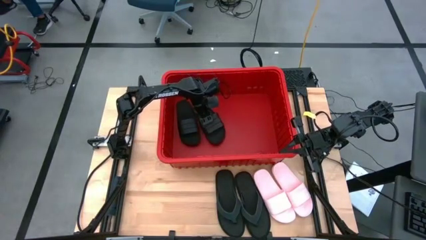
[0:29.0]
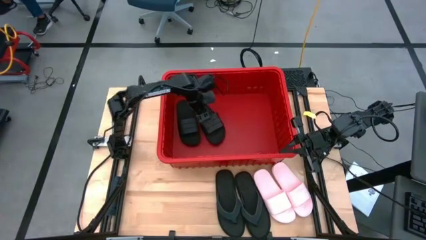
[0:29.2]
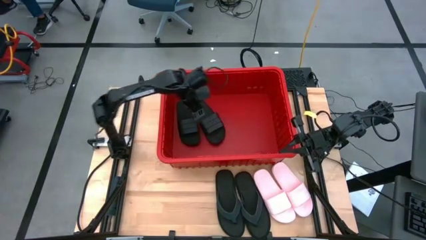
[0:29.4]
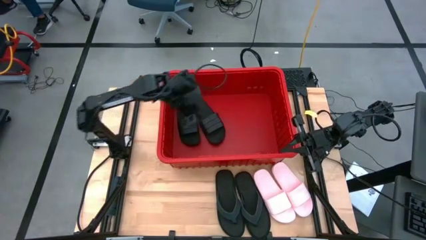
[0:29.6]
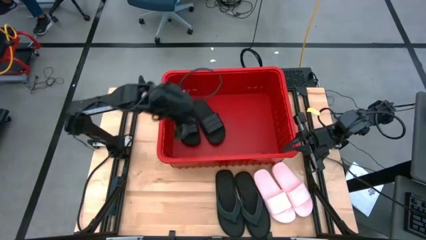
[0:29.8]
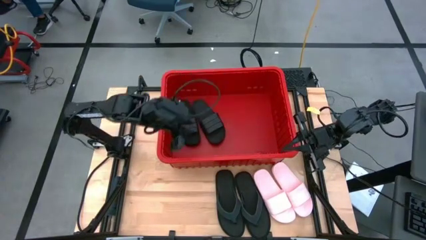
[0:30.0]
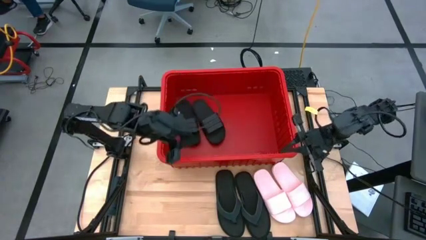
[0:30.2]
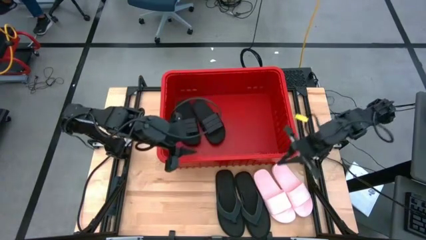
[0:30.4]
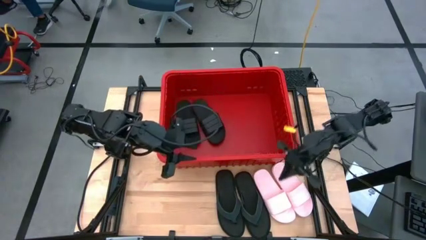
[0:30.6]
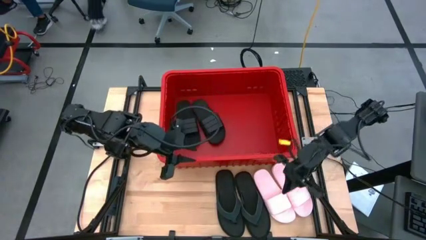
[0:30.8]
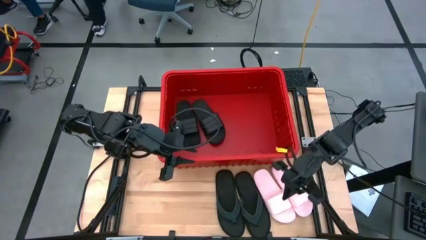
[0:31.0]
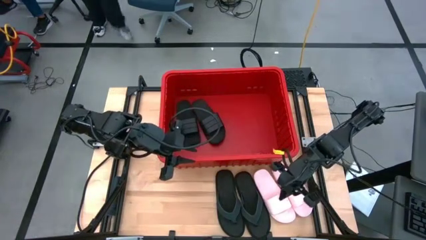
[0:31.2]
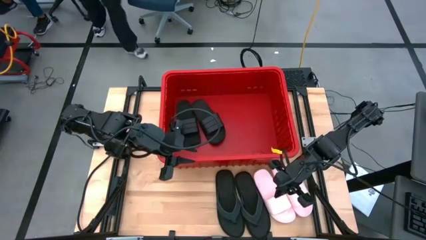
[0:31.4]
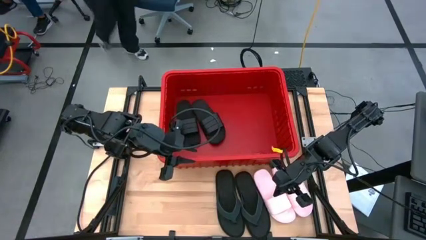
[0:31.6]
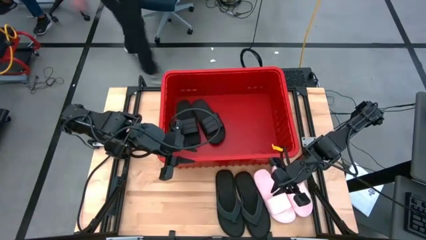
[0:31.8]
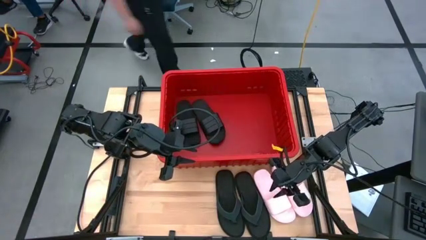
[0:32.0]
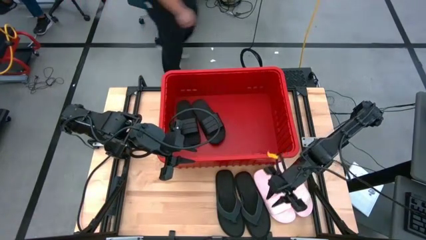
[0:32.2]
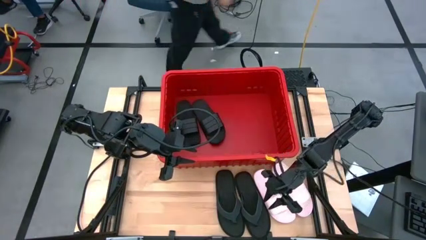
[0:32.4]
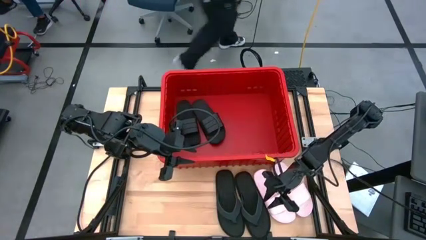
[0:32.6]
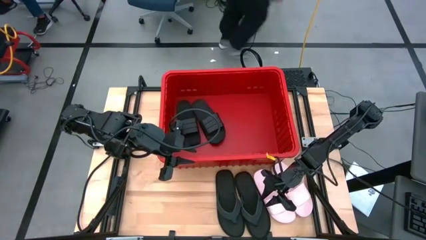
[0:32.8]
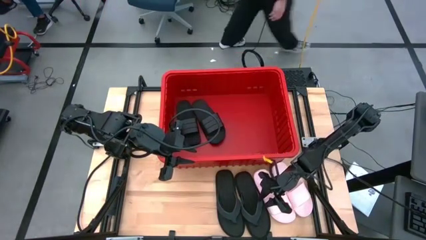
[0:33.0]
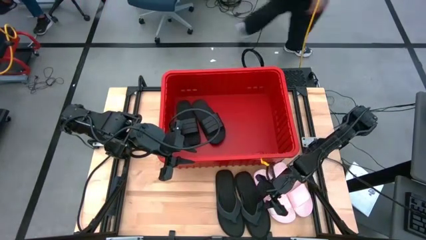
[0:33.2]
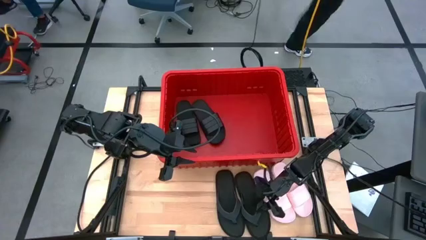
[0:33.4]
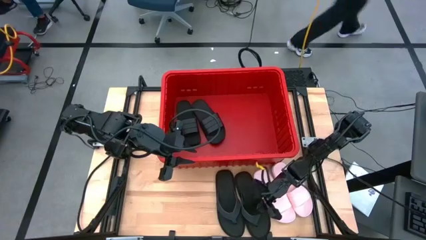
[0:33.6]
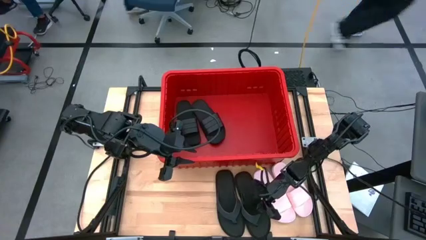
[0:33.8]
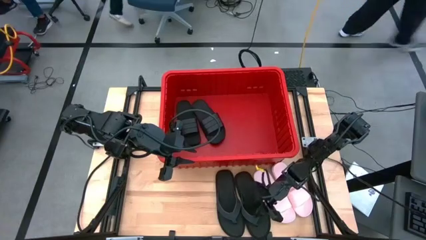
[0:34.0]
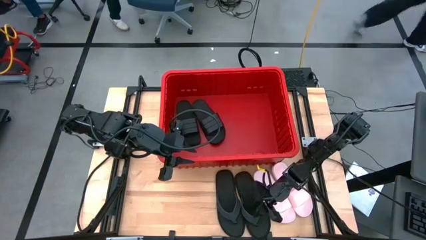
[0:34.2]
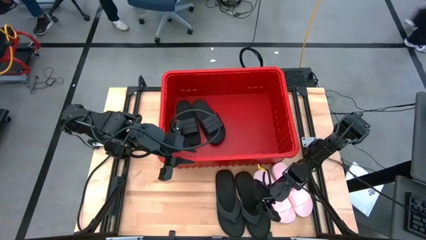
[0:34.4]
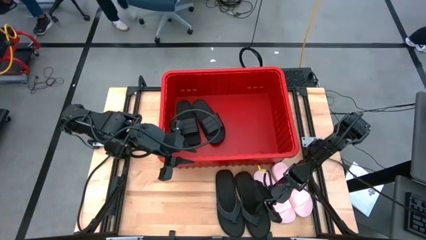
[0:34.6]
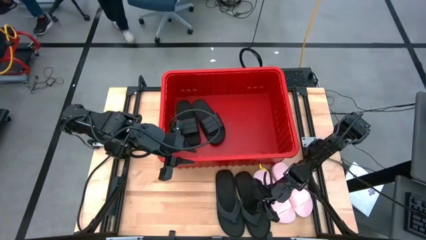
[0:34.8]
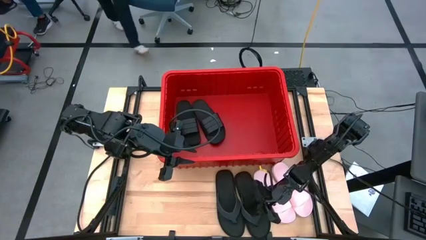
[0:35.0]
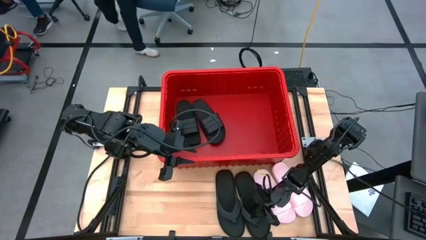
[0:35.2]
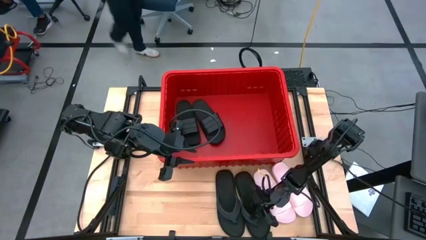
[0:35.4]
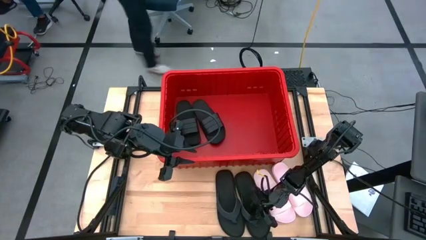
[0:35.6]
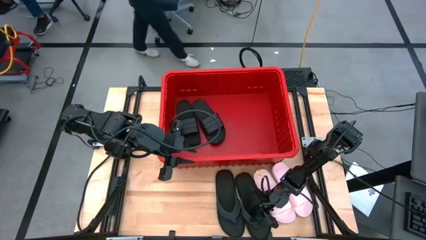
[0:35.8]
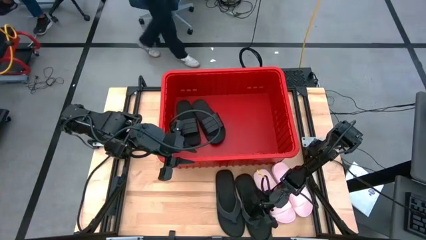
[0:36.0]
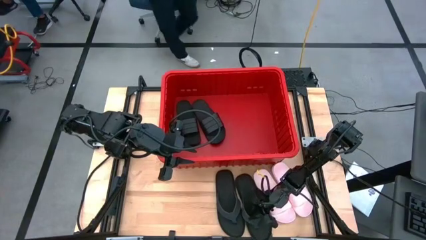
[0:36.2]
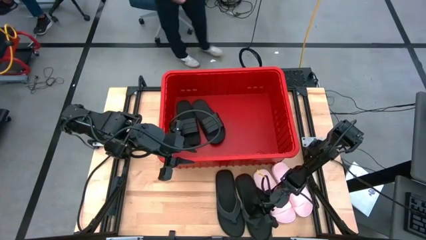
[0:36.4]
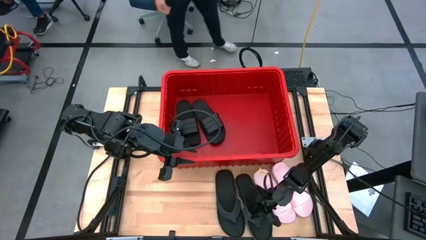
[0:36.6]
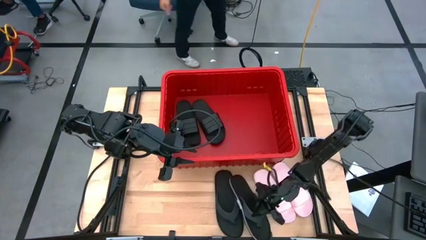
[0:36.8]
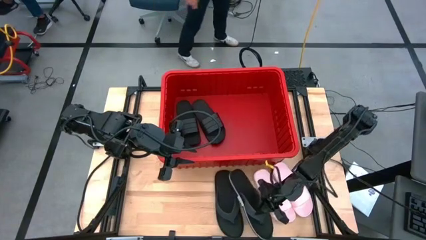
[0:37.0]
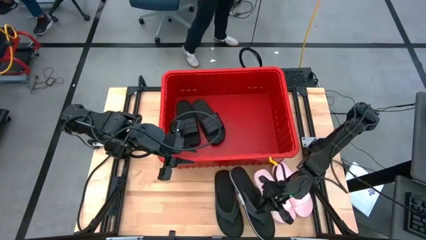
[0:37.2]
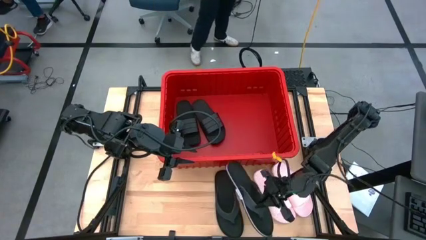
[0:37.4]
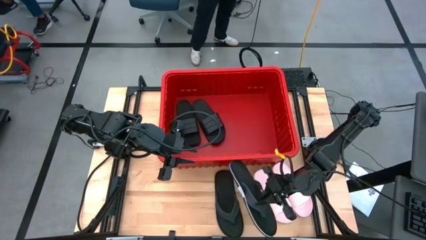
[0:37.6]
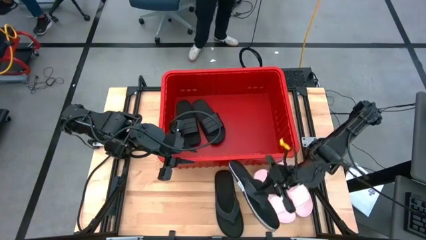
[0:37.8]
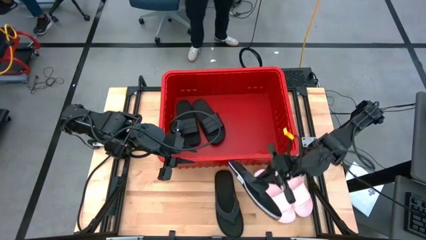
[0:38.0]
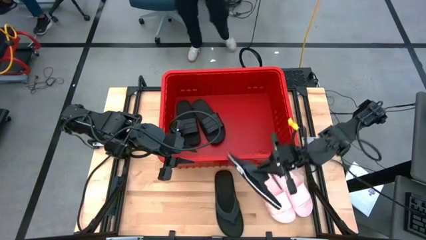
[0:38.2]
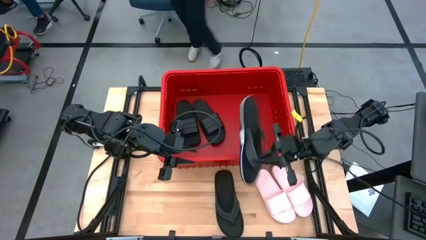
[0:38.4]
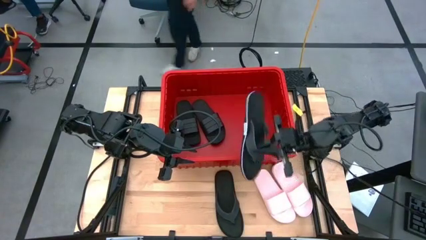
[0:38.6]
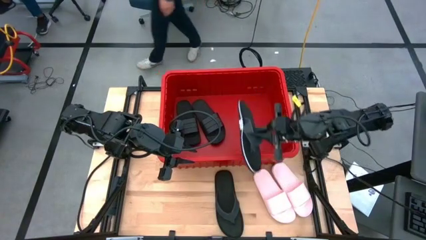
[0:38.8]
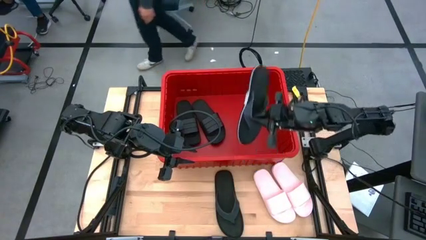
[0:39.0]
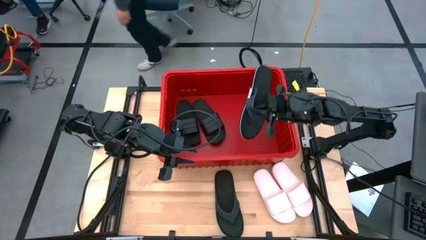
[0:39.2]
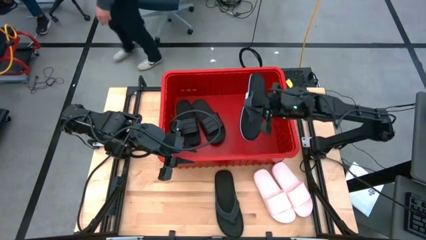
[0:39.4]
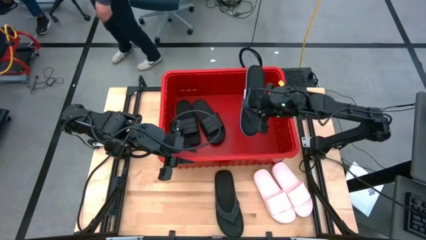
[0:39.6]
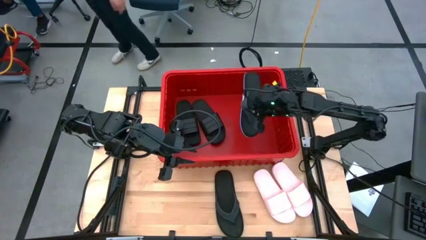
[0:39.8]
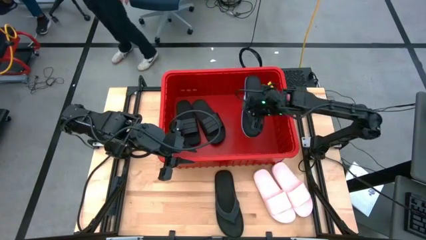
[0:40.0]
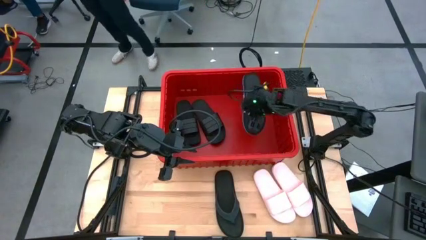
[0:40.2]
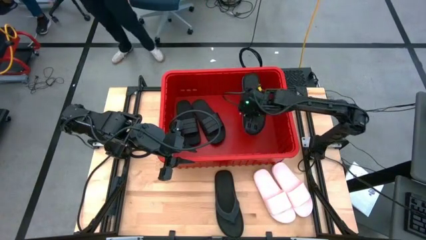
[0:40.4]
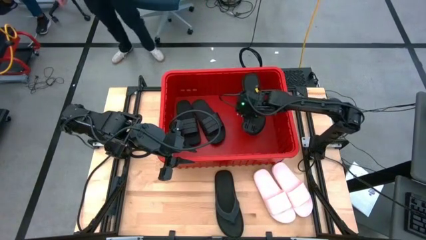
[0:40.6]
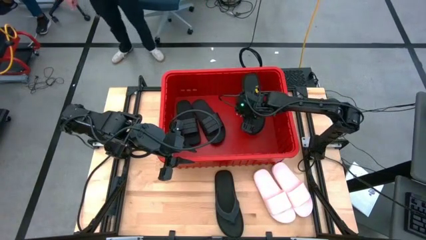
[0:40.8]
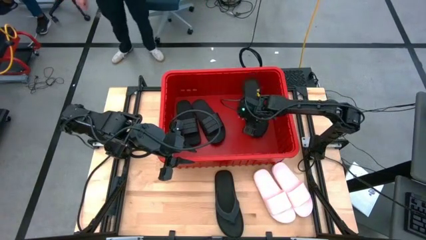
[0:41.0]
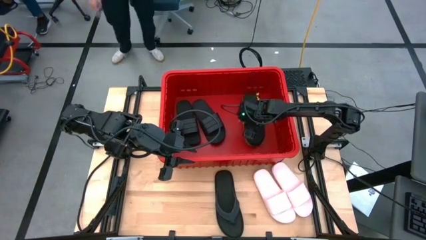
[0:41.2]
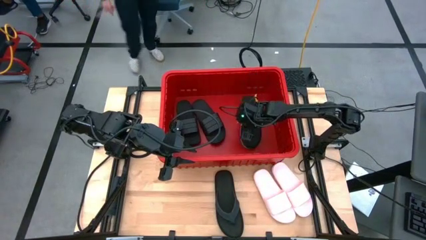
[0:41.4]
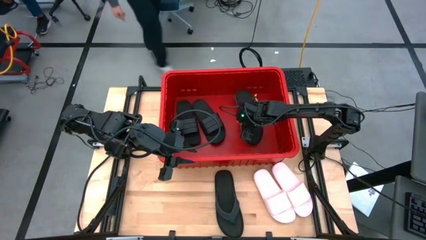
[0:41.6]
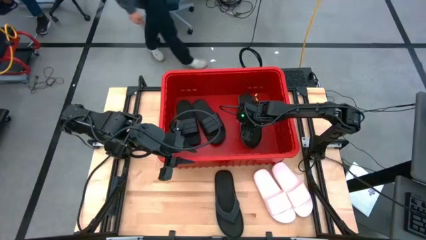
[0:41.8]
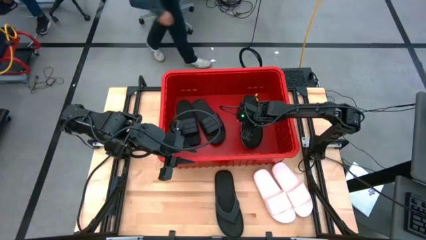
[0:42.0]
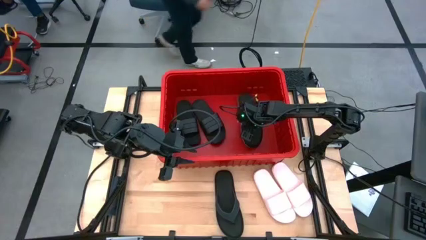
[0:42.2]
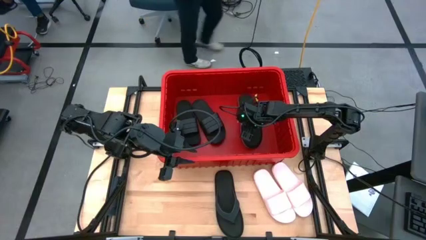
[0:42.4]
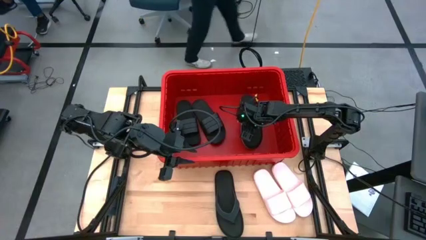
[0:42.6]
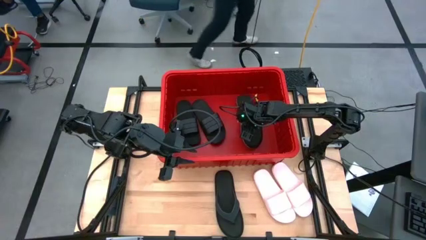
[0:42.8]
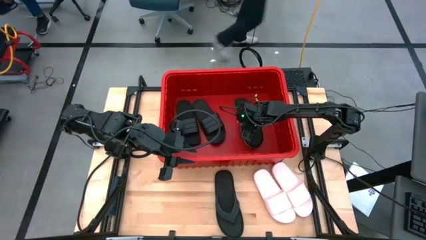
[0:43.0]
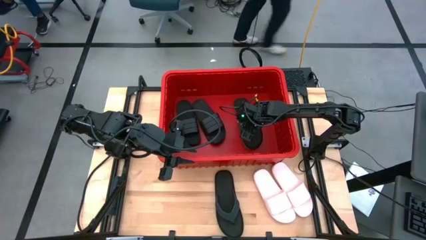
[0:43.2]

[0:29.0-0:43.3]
Task: Pick and place slides into bin
Put the right black slipper into the red container
